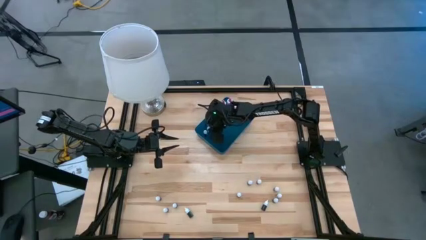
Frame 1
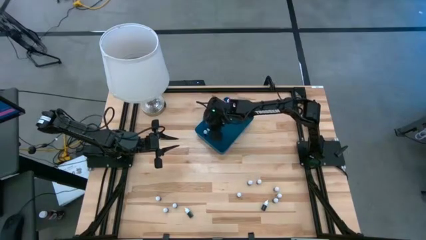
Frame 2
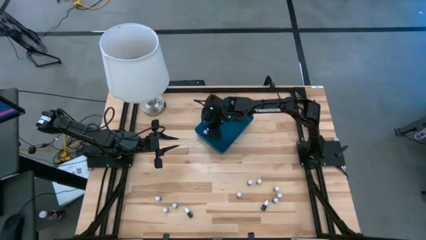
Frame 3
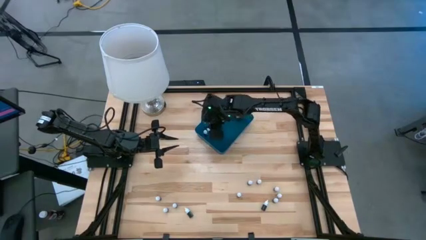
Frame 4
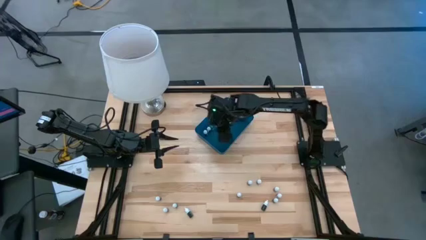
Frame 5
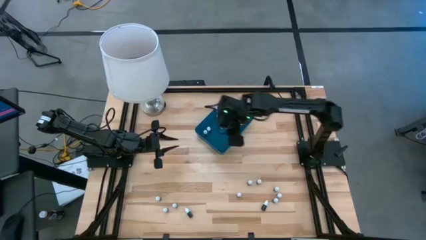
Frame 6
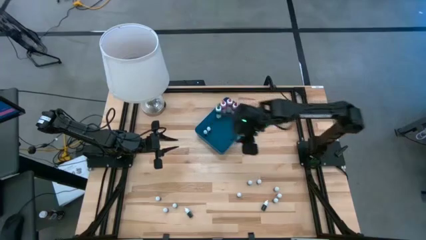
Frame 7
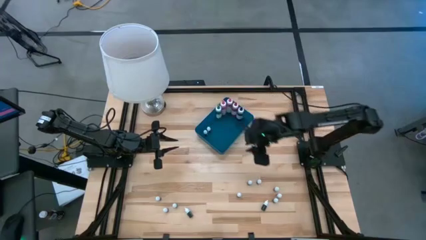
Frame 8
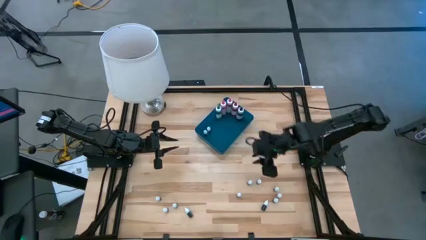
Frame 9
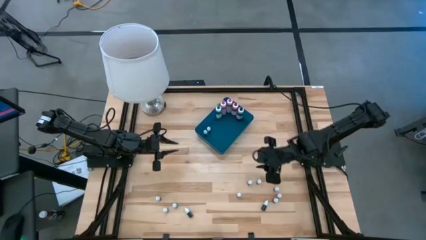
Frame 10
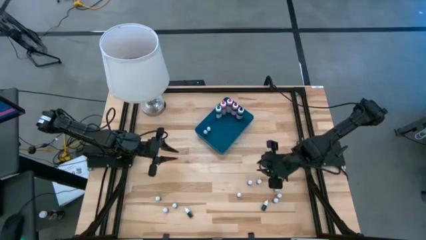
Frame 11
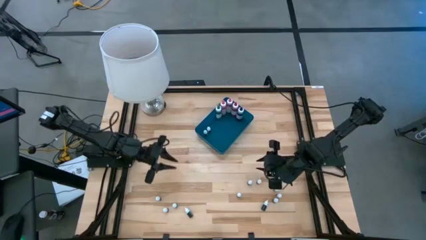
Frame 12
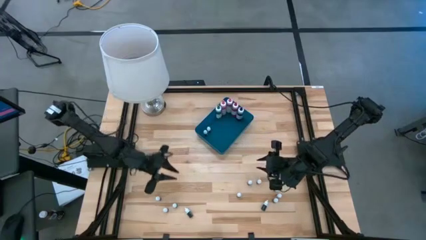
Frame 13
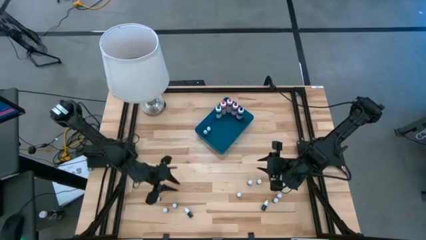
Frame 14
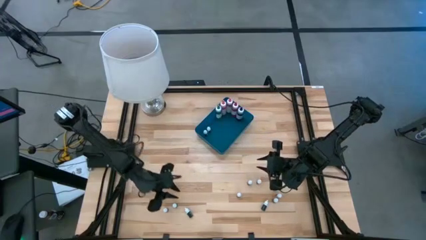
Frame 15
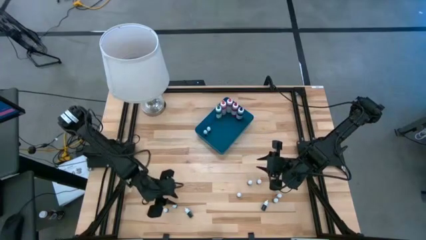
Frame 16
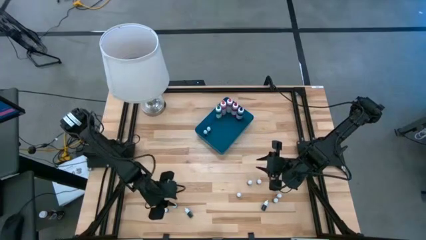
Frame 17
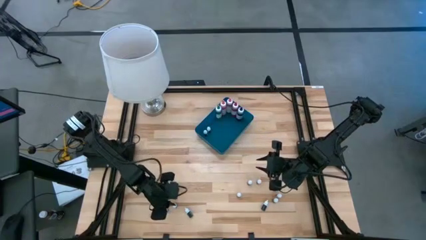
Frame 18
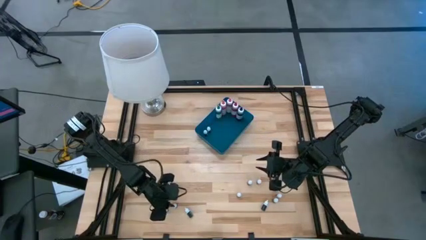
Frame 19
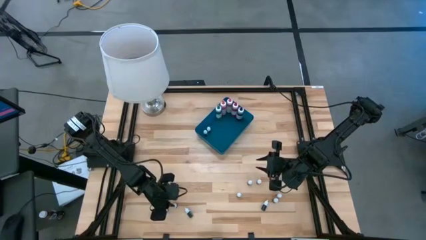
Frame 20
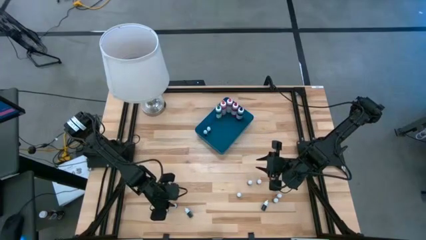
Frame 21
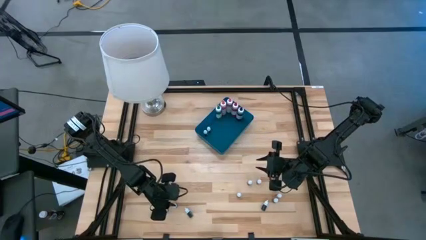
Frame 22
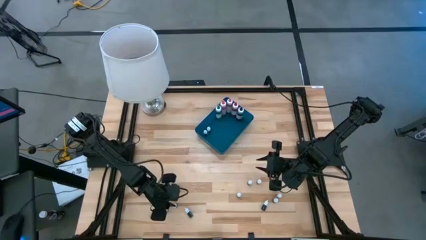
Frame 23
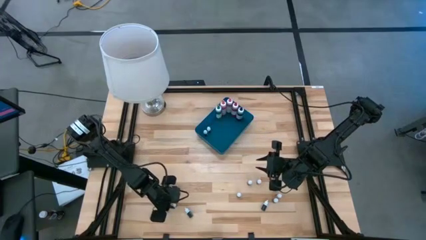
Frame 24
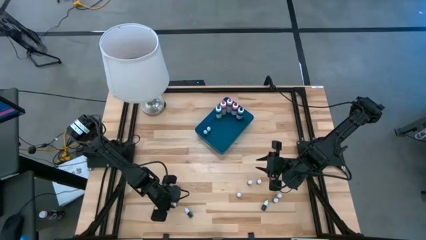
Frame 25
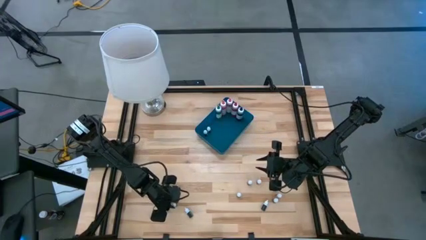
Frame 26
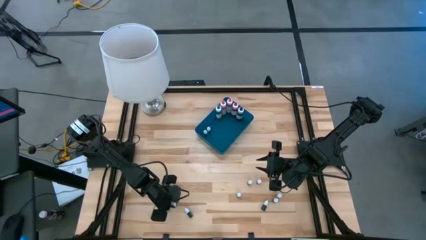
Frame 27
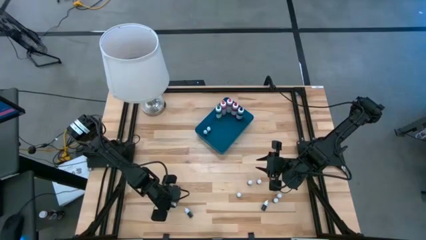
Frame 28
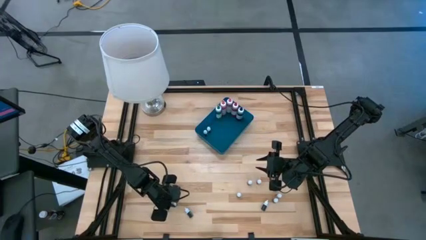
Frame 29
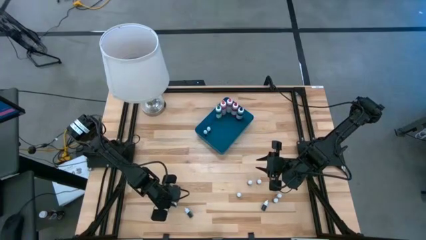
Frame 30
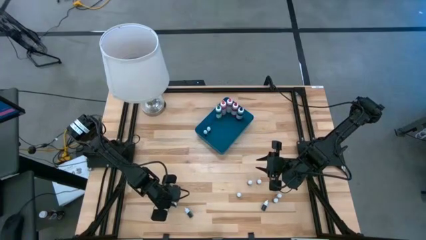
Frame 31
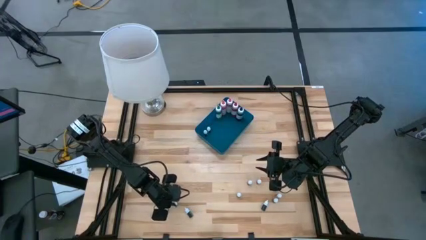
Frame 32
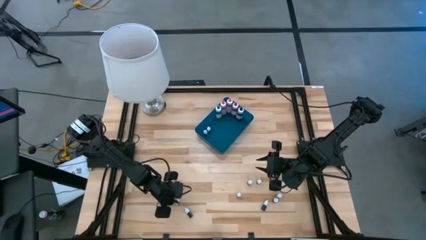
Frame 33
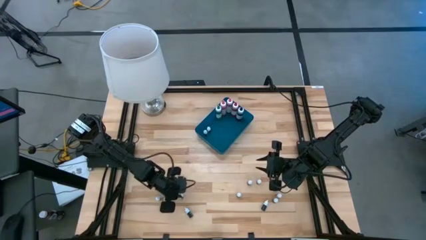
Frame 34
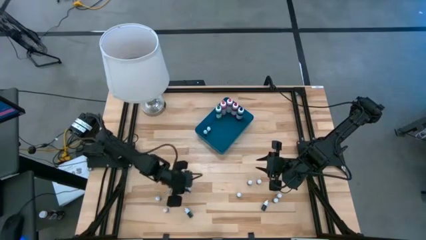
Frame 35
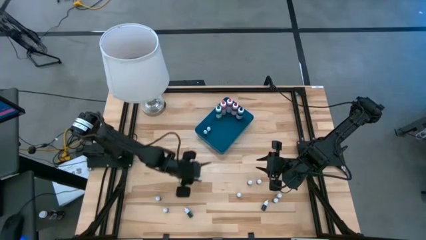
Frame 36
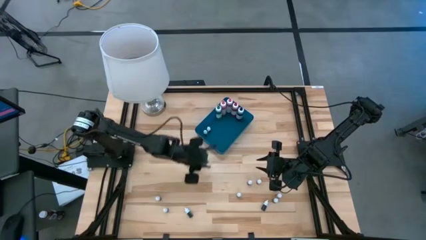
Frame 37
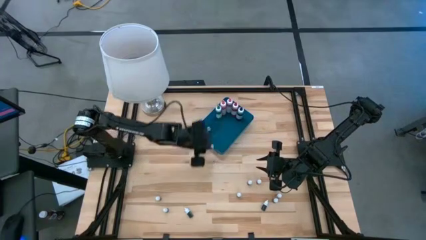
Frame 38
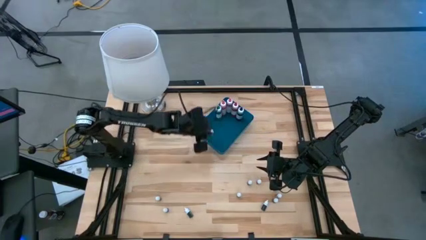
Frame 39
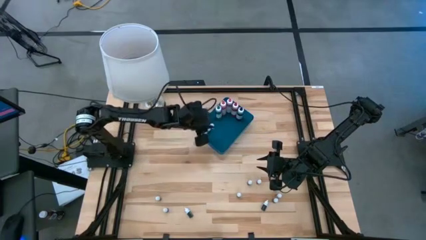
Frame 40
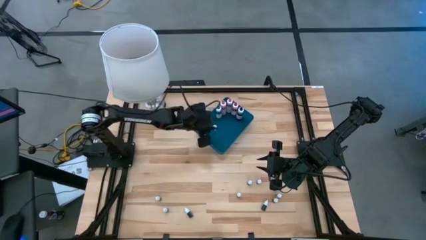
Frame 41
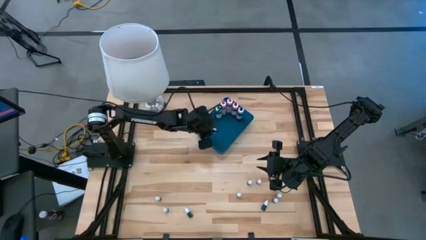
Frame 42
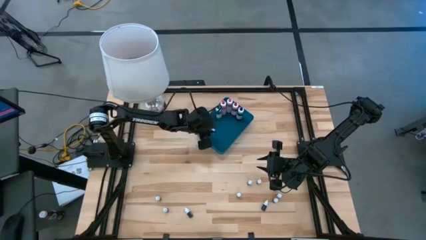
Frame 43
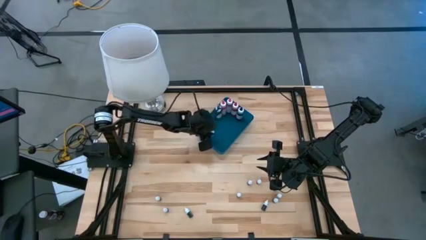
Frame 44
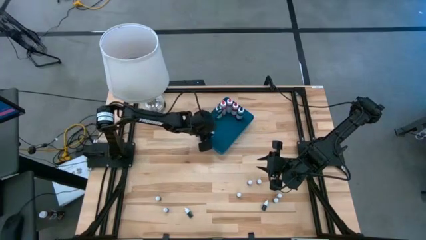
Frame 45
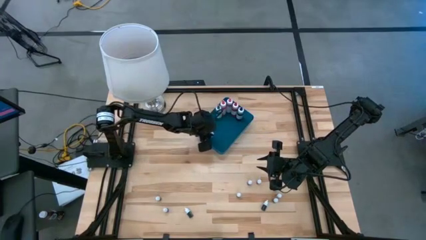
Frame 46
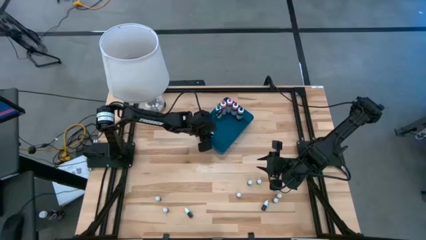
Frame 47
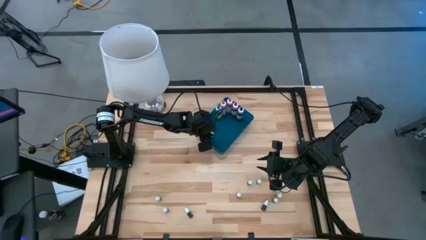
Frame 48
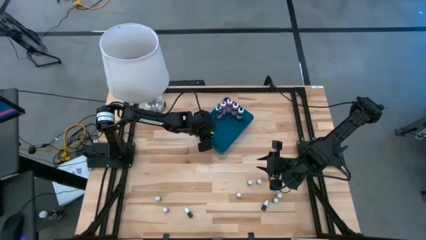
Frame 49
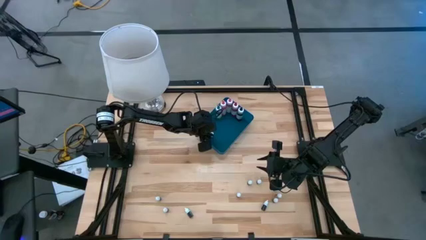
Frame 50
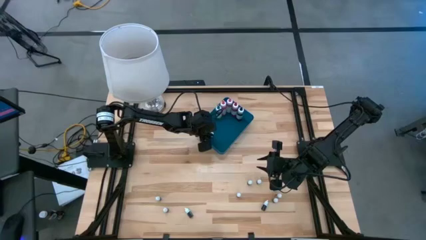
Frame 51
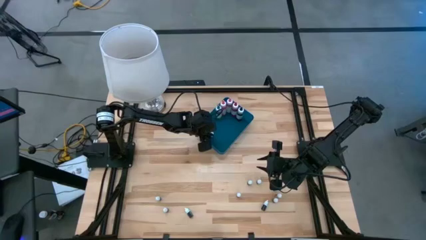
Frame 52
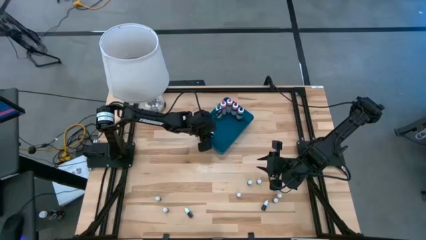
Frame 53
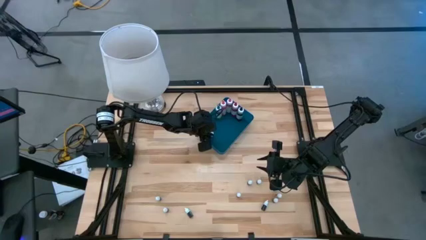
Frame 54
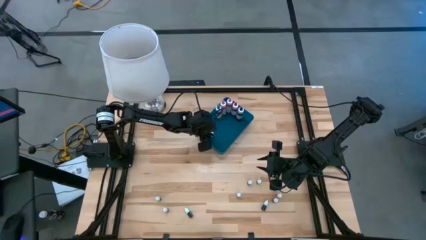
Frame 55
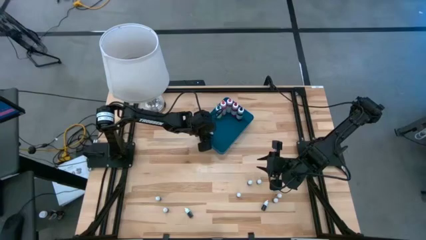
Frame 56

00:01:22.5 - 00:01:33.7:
Task: Pick & Place food coloring
Put the small blue food coloring bottle into the blue container
